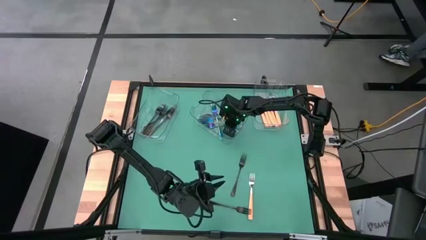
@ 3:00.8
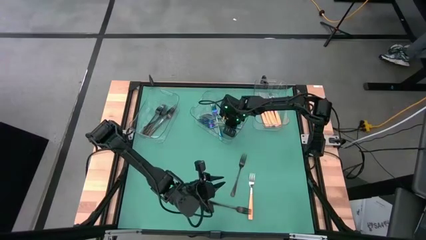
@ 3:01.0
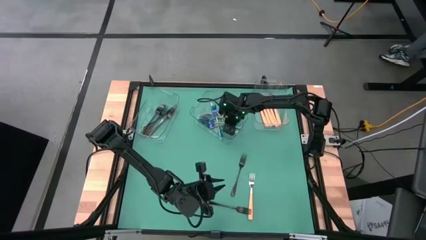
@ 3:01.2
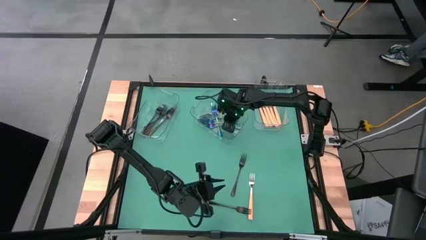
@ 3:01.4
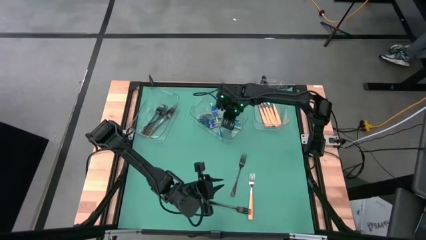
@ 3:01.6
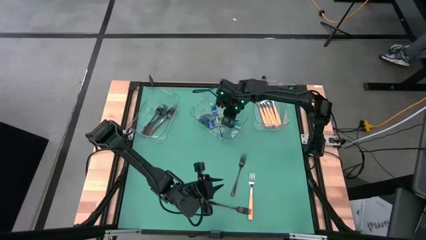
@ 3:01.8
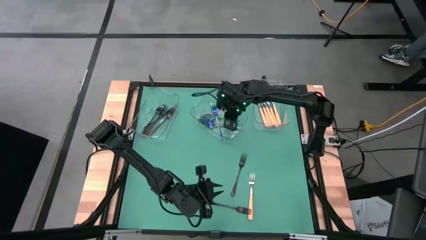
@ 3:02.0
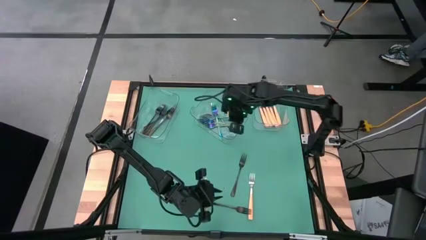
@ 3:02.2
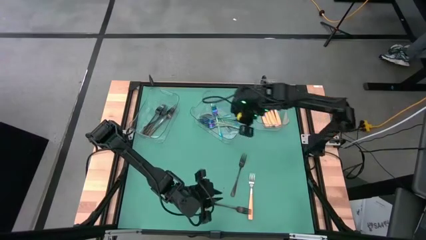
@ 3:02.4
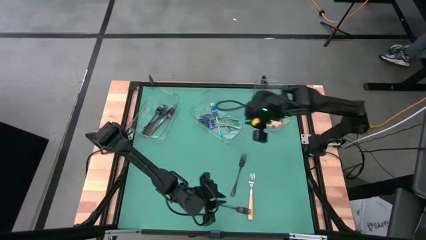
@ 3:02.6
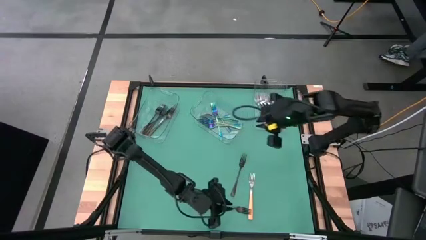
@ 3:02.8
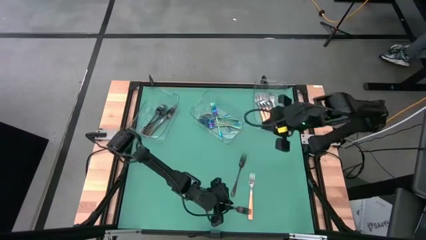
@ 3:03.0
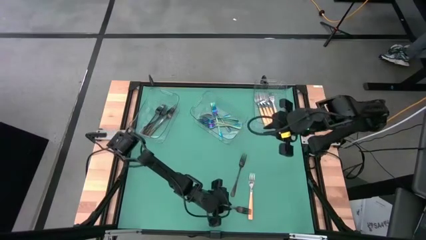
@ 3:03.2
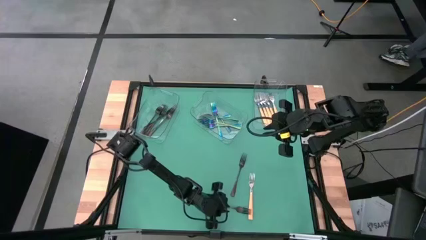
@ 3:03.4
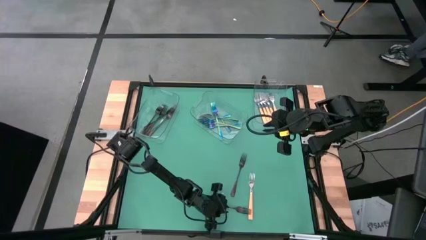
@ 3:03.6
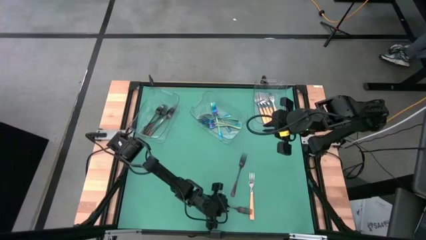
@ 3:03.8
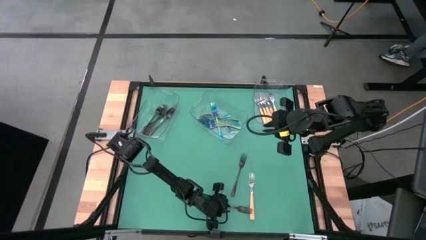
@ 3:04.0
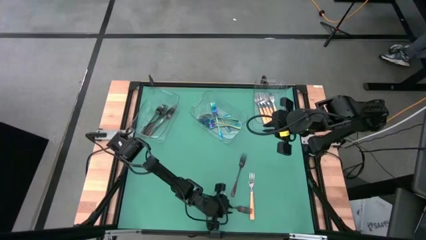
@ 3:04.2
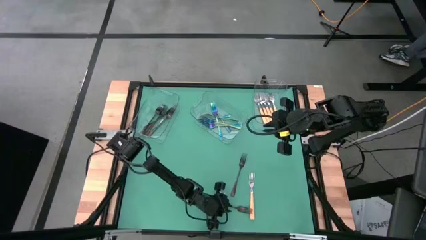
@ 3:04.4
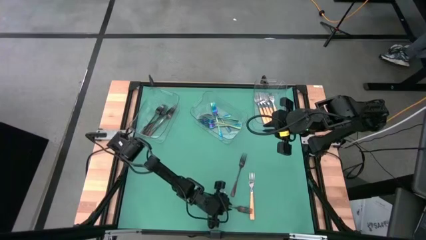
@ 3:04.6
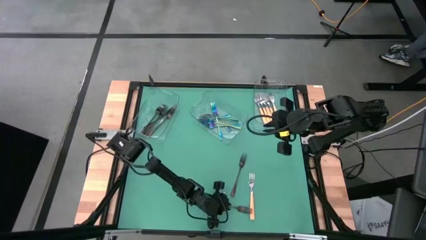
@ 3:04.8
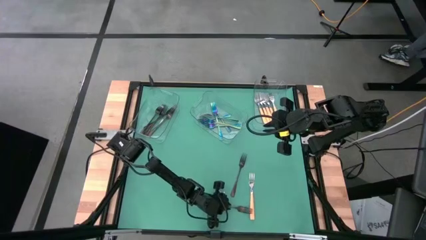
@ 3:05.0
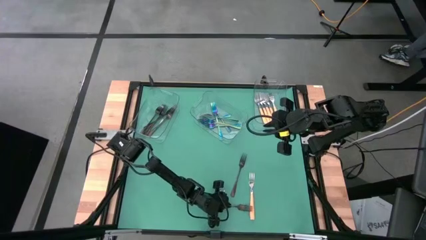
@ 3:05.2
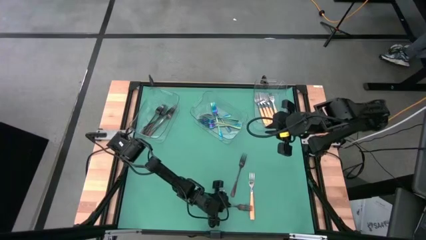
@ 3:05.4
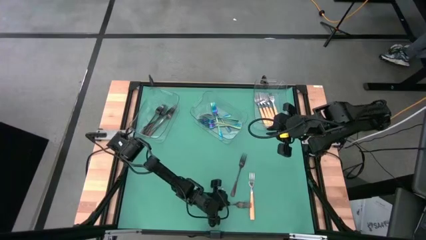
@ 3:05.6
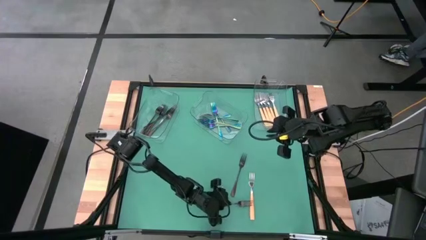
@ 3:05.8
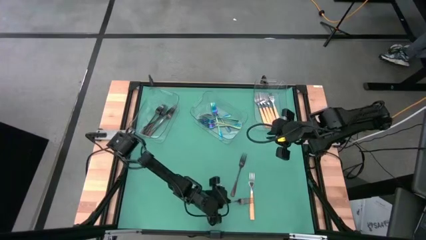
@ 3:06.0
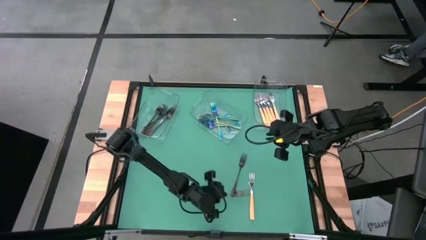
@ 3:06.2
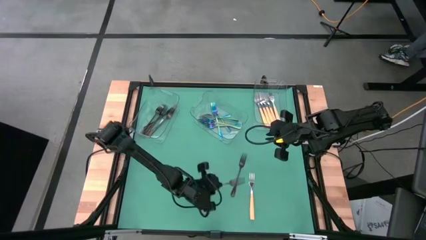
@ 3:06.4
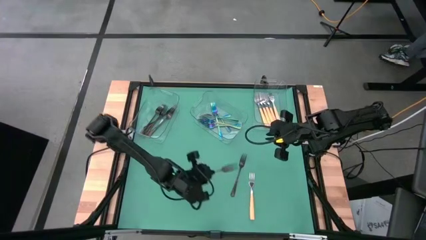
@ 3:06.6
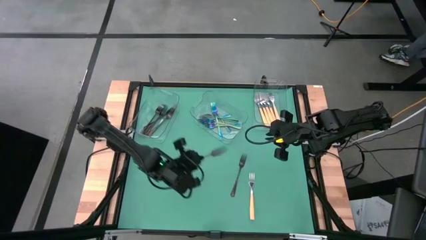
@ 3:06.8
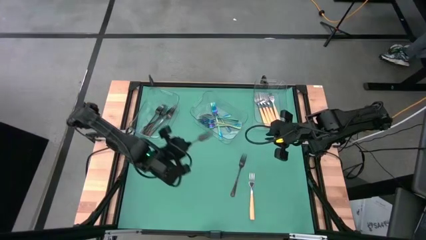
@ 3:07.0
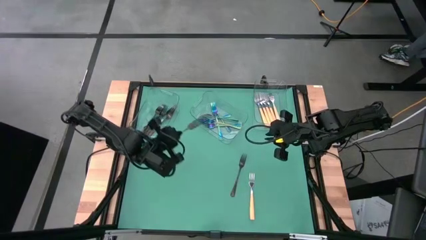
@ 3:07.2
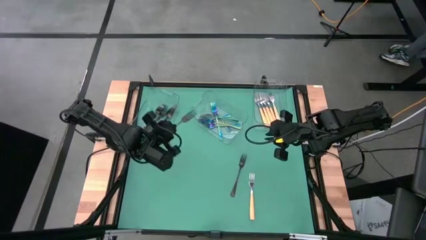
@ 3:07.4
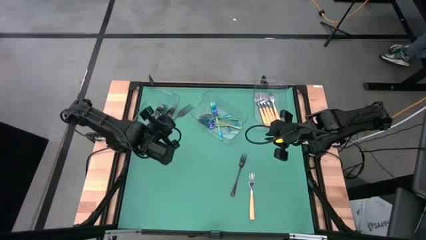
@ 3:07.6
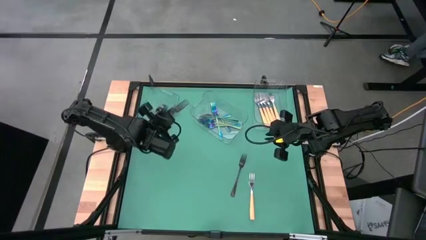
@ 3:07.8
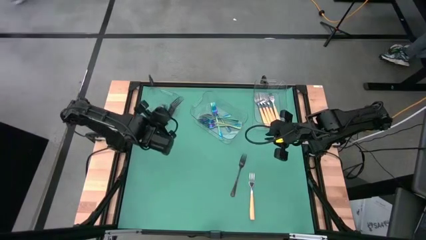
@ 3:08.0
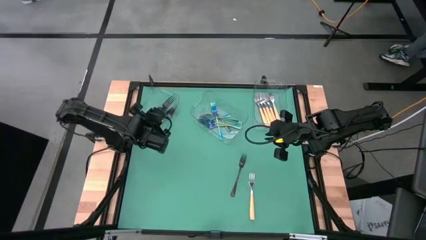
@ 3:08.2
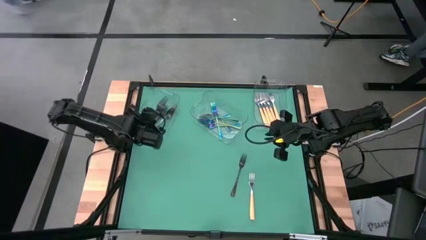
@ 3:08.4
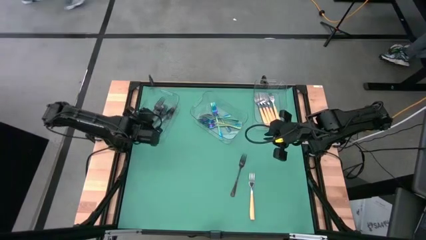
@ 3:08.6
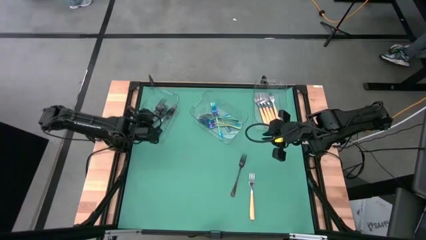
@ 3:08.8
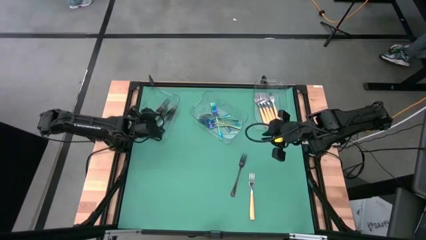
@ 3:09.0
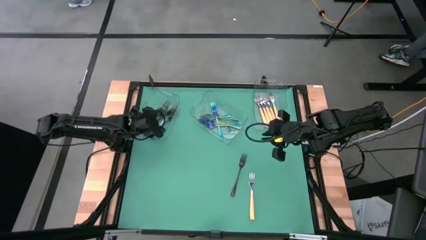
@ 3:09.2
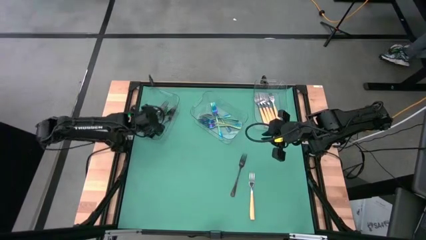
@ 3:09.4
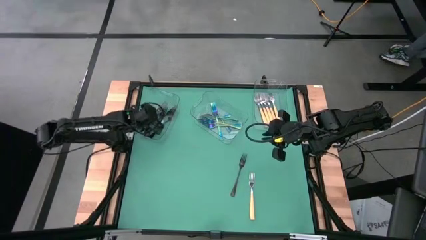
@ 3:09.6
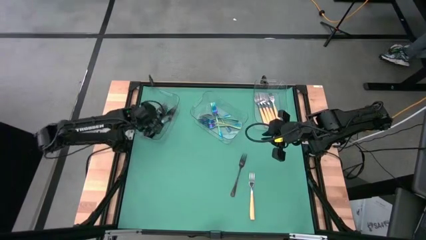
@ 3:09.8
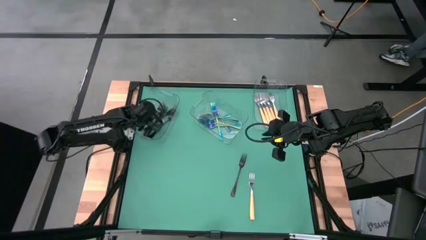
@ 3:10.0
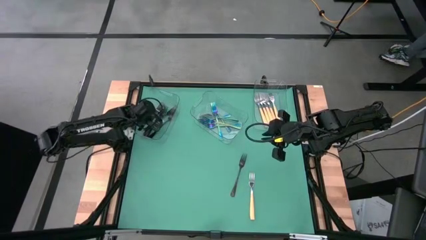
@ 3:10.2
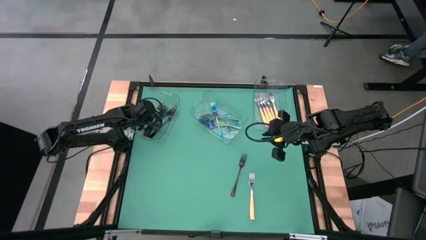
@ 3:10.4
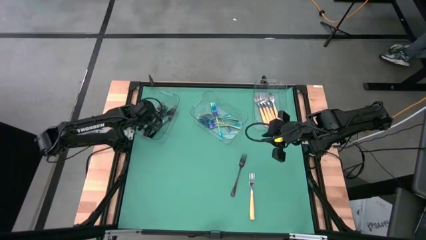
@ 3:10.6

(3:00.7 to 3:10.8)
Task: Sort silverware by color (type)
Put the black fork into the left transparent bin

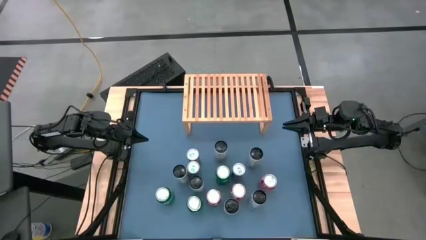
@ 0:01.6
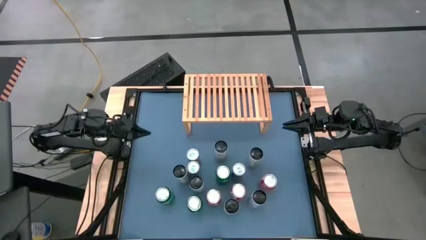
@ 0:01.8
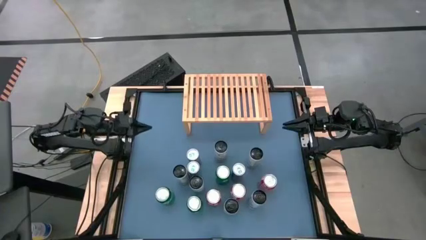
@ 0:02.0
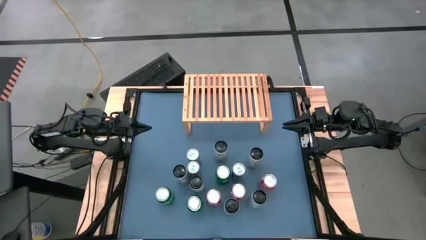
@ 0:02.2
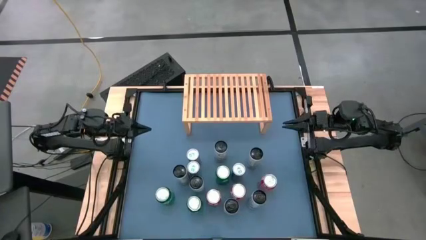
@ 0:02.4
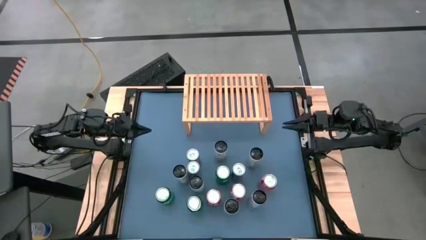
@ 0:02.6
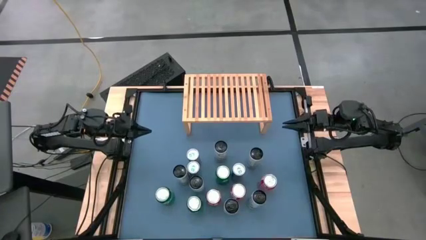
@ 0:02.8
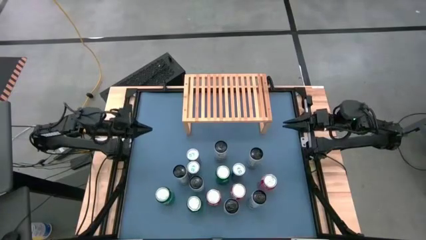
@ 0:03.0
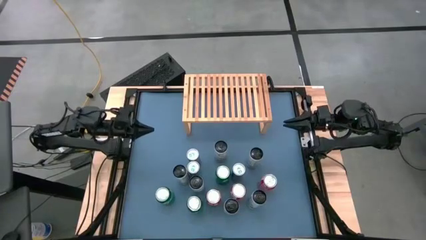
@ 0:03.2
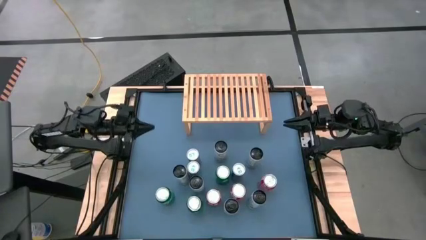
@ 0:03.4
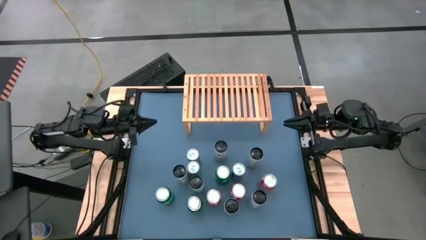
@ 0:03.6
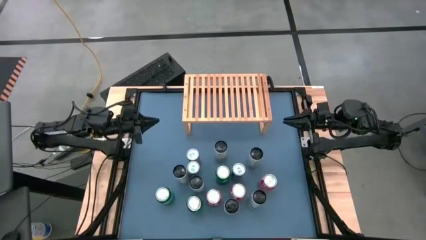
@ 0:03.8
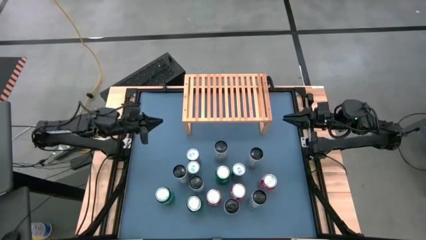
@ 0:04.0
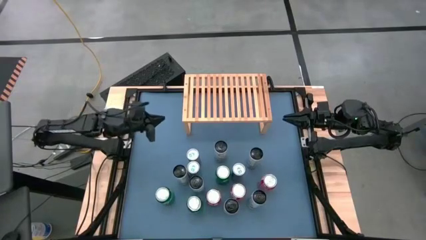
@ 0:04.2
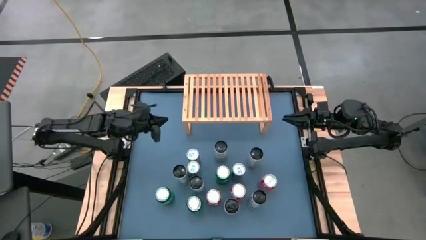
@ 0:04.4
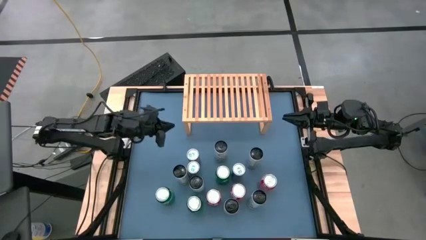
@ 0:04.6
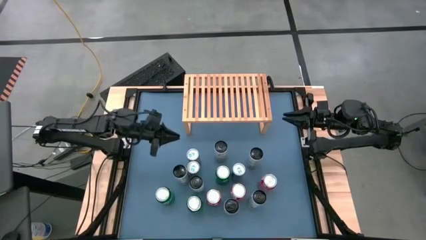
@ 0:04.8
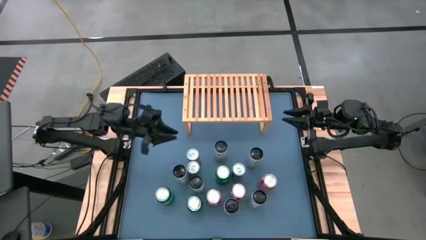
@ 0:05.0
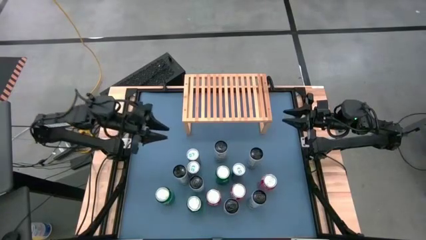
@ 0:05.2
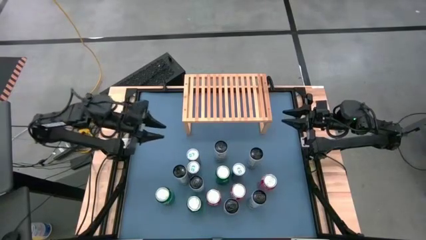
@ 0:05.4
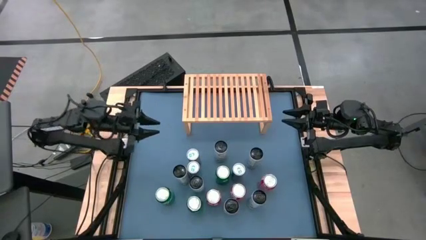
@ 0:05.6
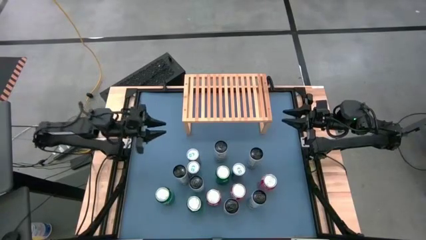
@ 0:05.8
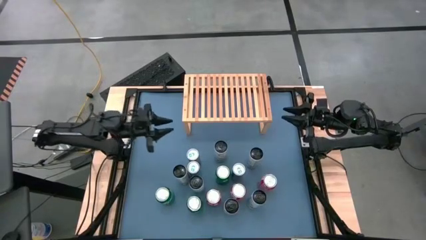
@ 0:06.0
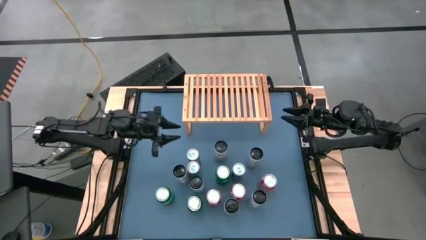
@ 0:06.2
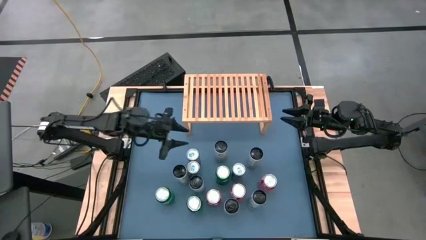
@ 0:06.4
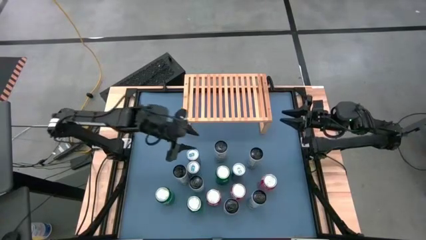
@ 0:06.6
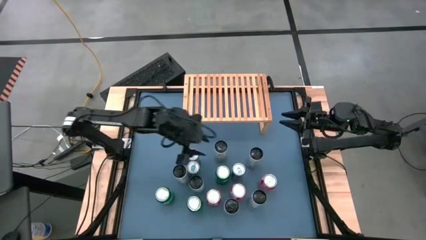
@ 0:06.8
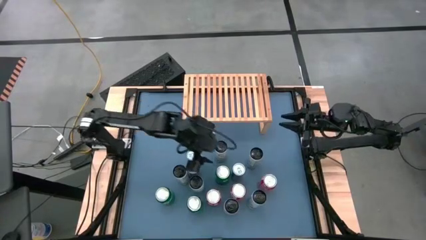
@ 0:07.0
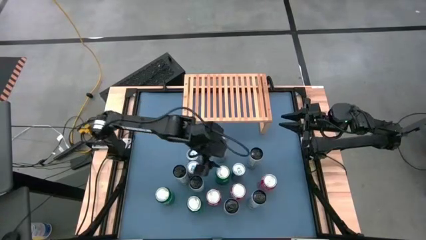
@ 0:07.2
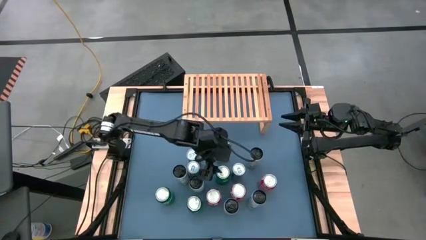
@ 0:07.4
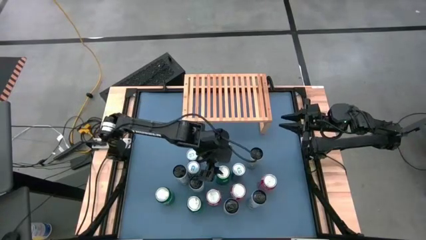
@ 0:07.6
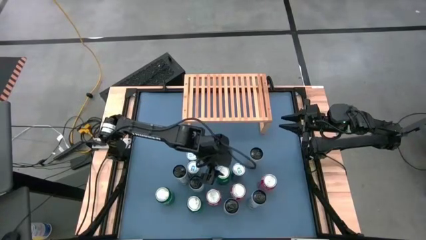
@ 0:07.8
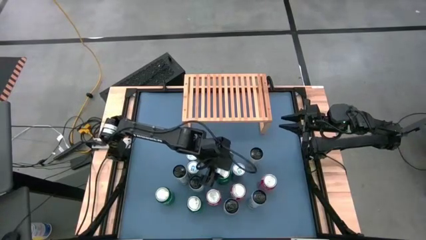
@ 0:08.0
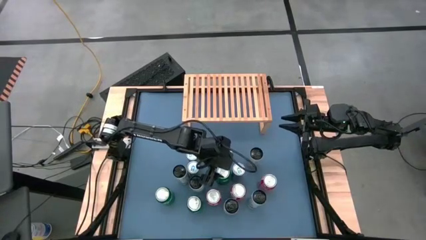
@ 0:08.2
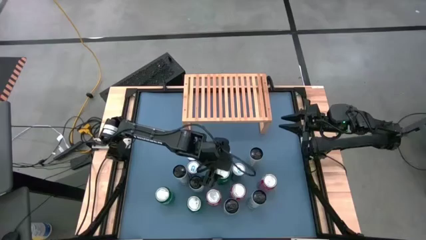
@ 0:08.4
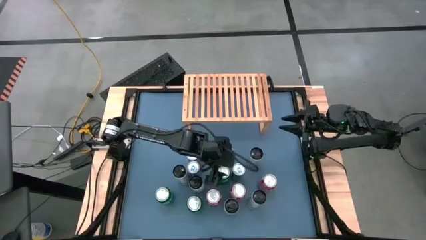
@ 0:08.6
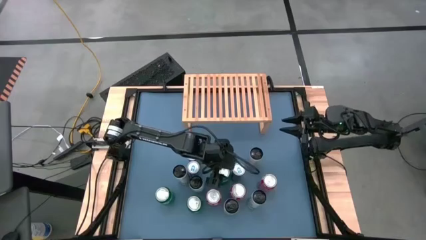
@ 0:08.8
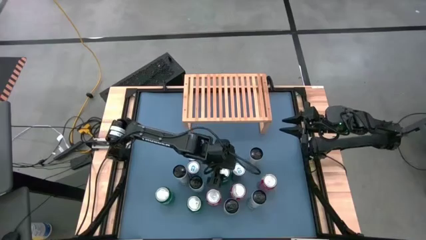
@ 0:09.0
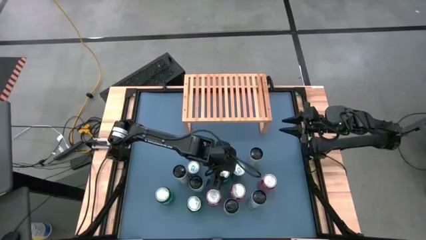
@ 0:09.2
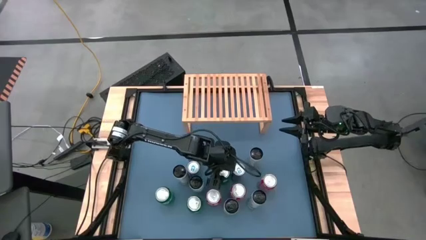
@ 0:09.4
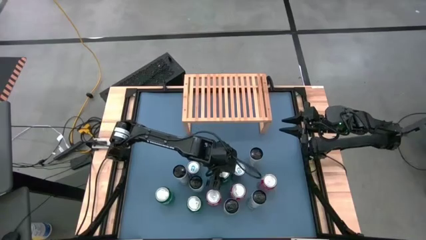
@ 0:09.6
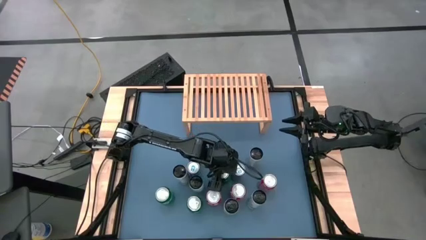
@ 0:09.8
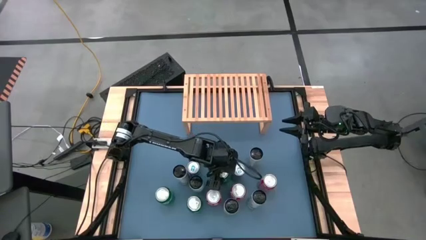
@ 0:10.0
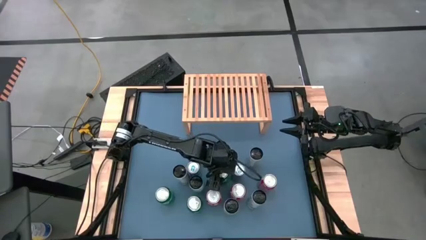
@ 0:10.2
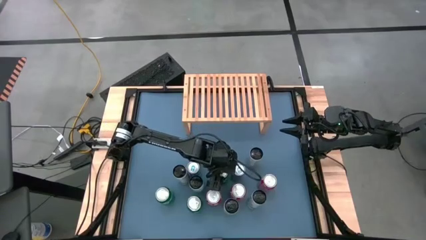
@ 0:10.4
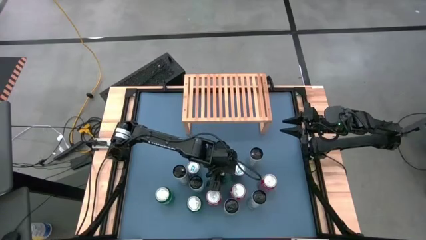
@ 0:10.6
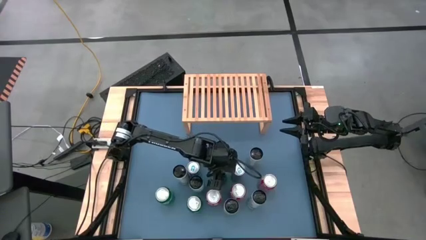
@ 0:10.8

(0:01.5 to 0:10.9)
Task: Place canned beverage on shelf
Put the top green soda can on the shelf
